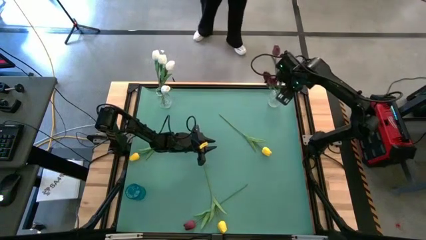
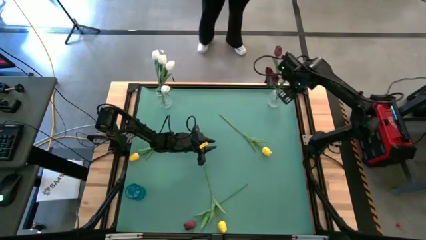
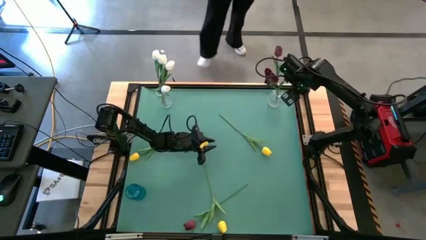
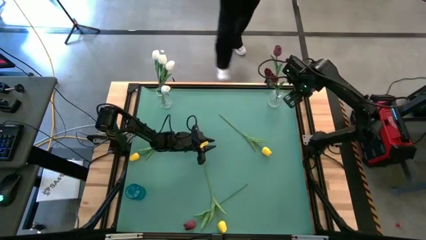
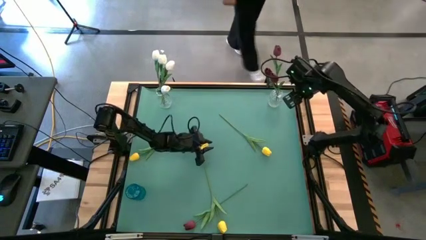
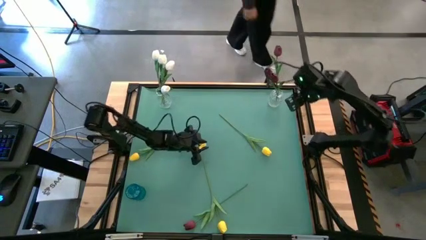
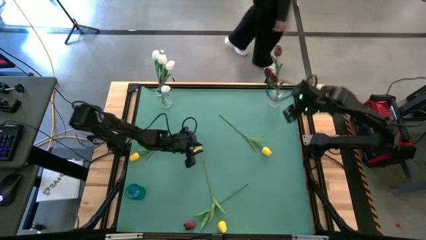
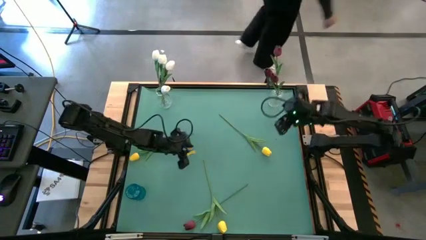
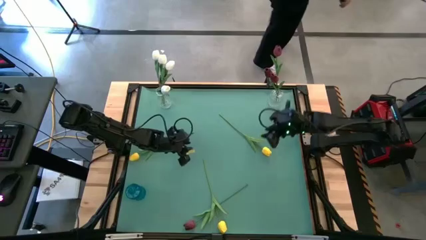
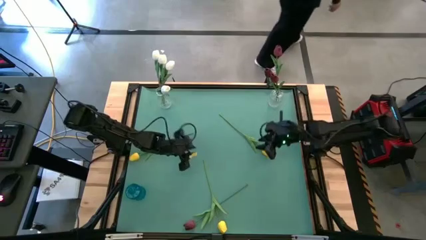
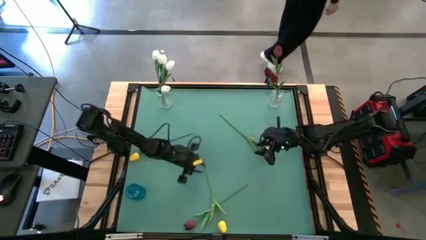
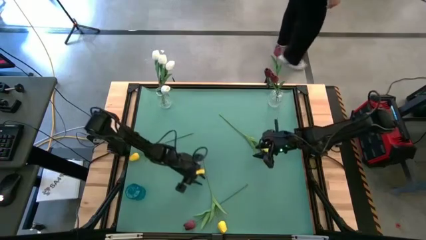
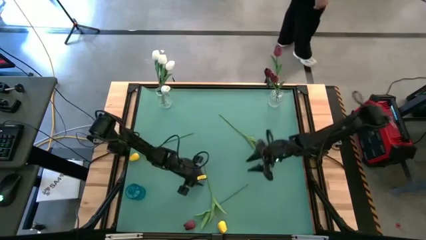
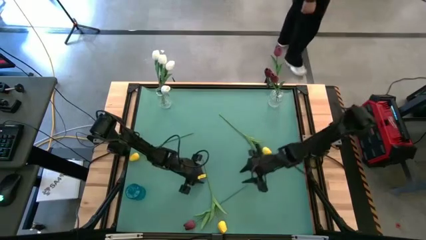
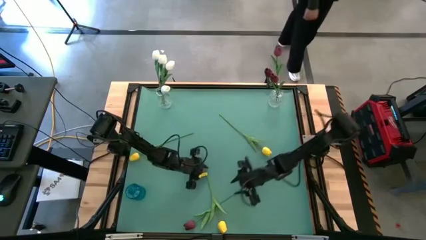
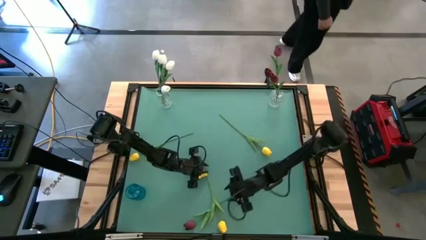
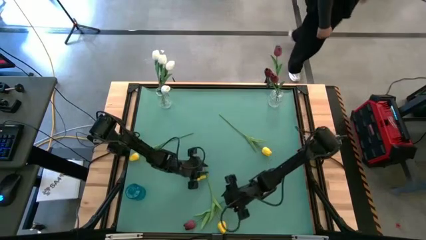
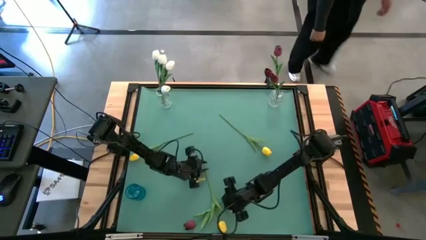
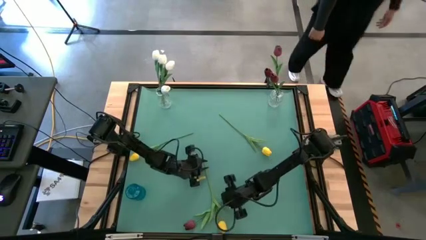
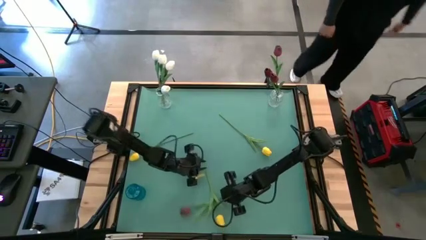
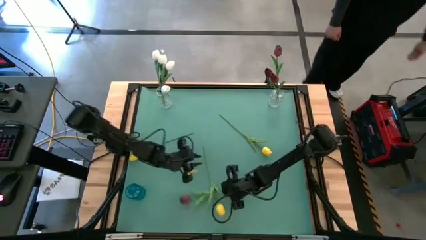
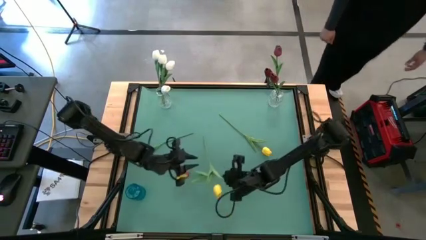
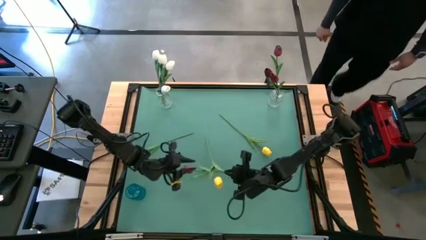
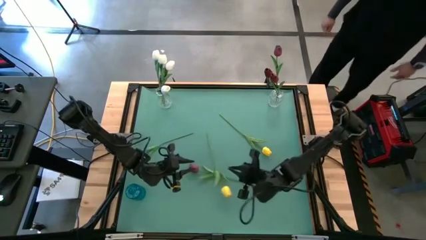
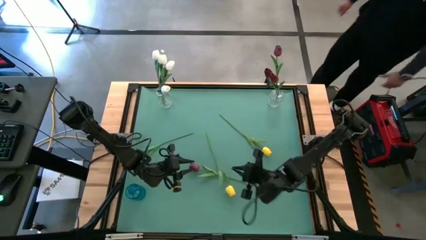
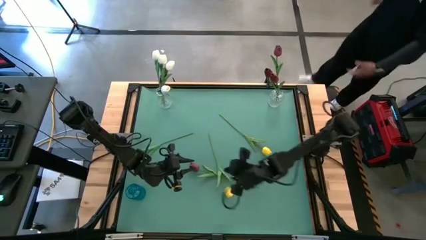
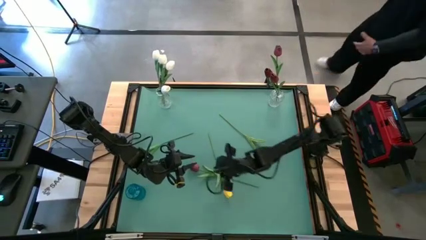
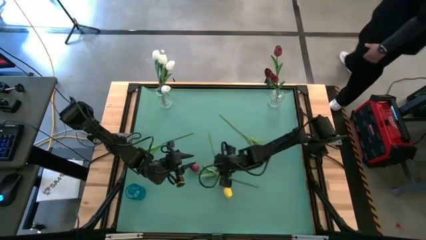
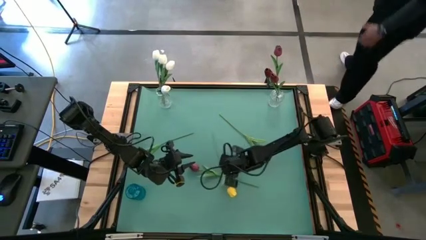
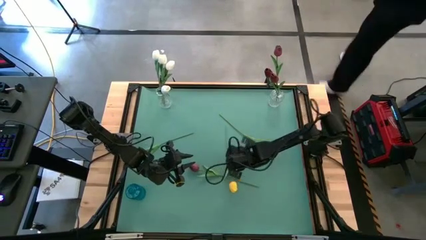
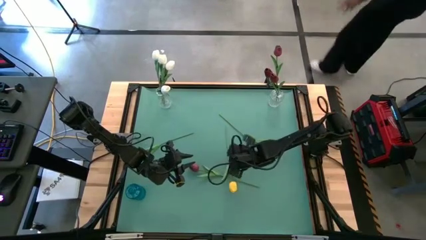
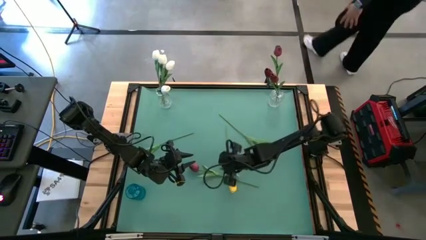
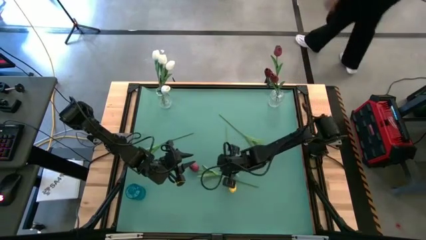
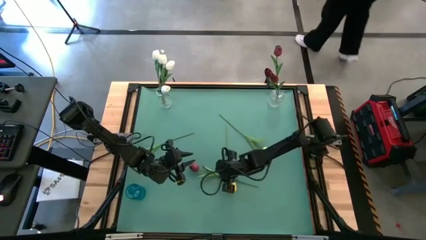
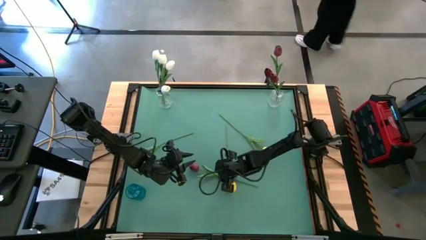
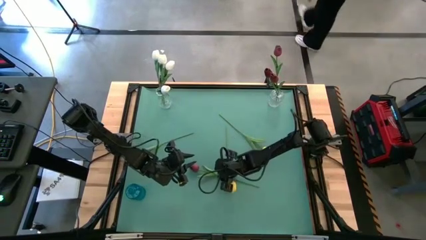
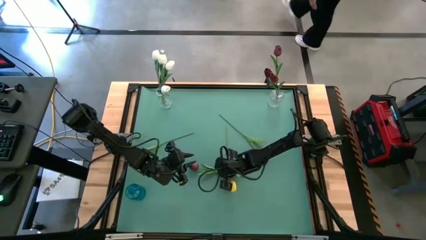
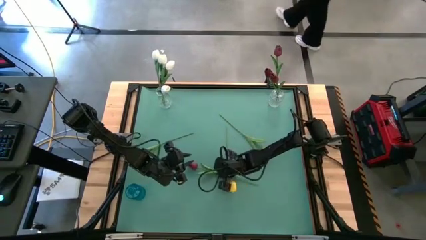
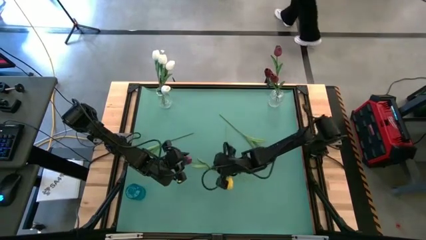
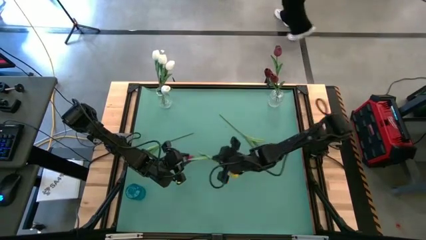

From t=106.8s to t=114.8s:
Task: Sort flowers into vase by color
Put the red flower into the right transparent vase

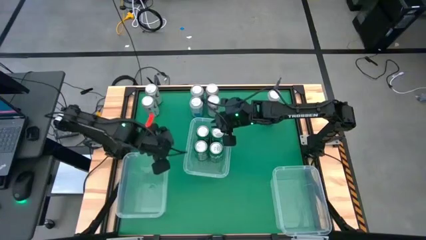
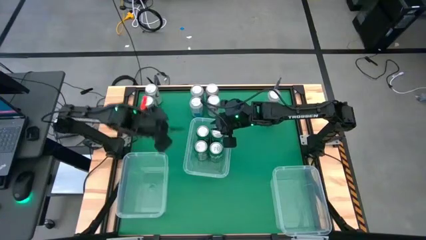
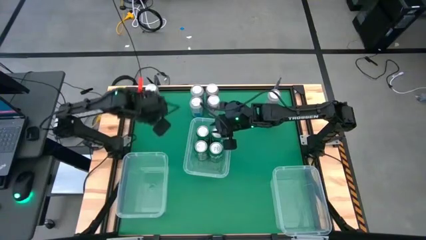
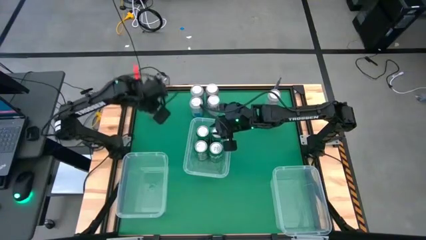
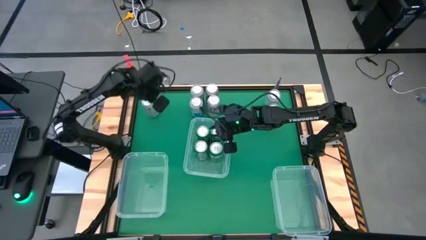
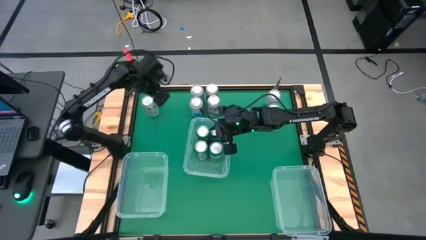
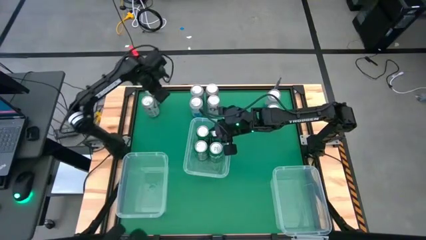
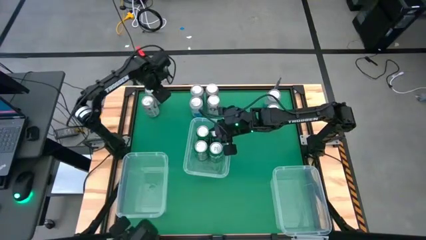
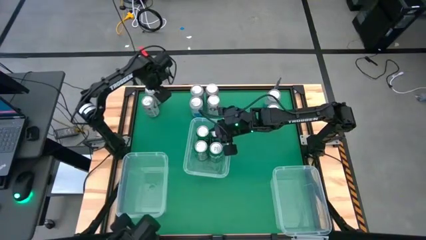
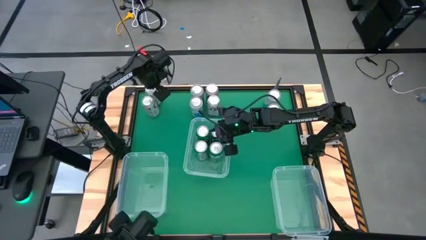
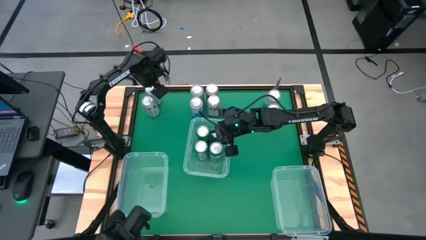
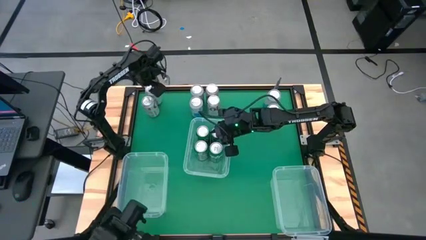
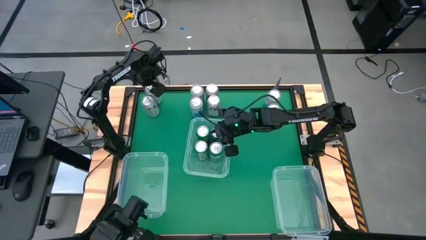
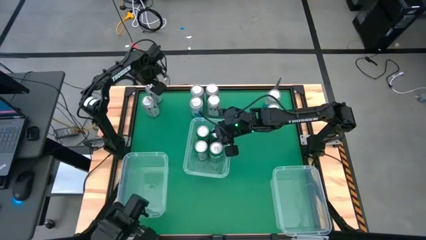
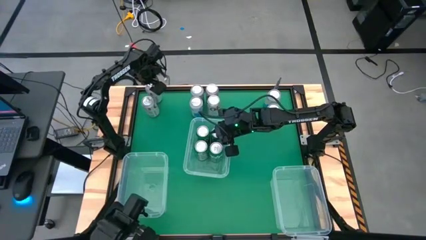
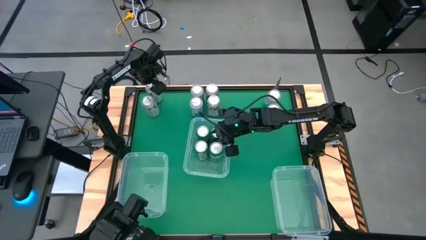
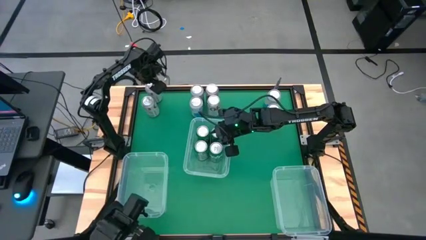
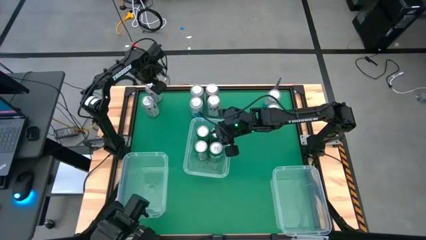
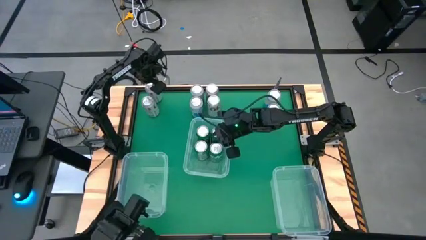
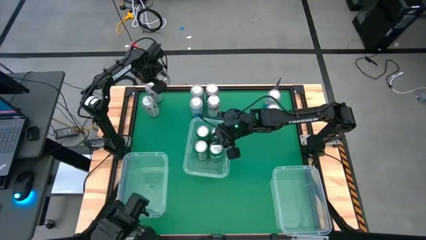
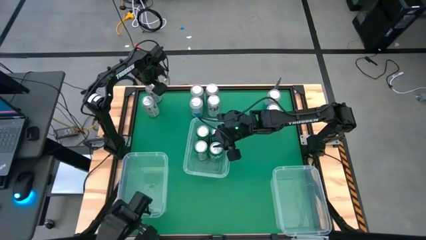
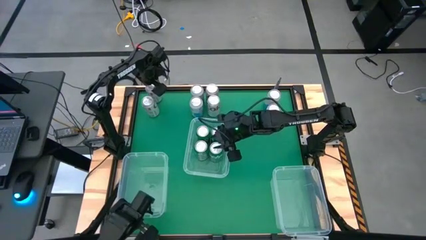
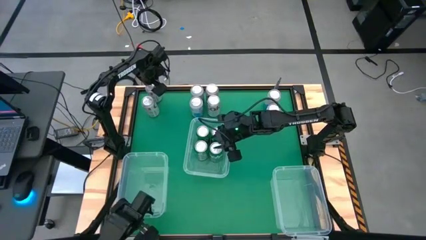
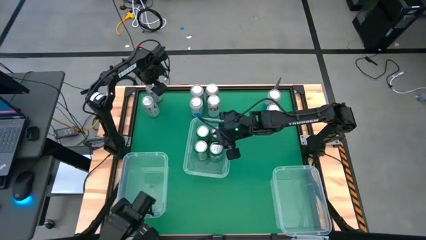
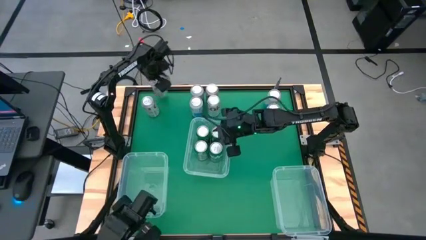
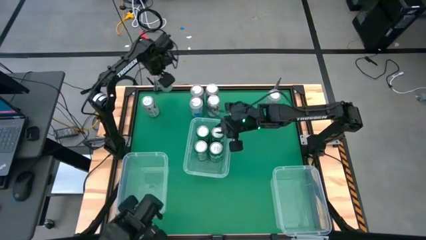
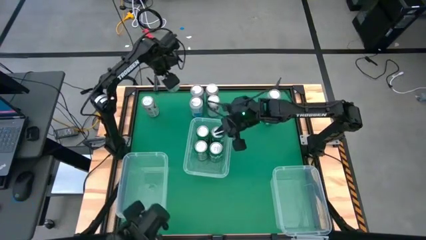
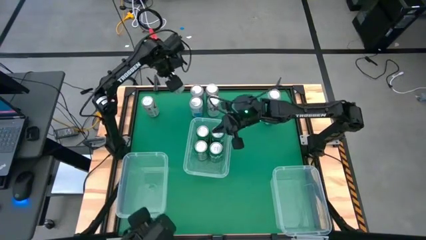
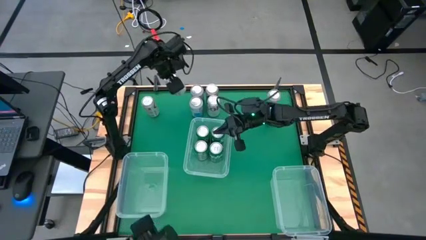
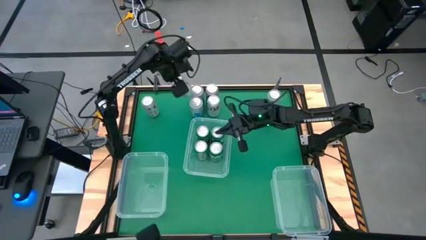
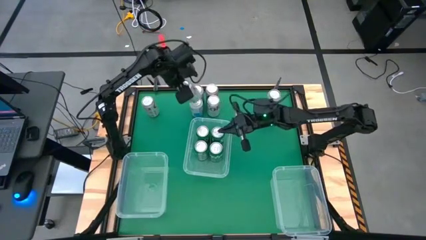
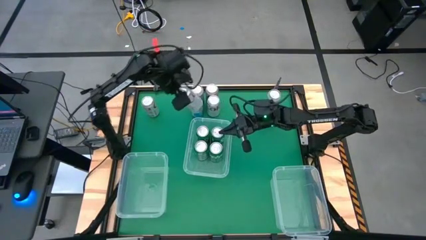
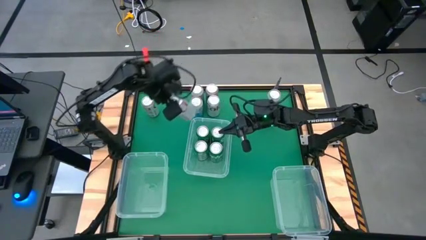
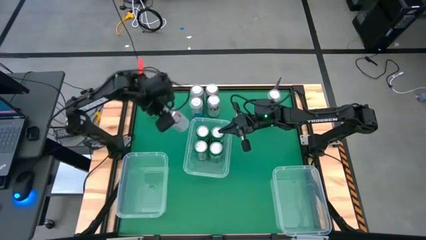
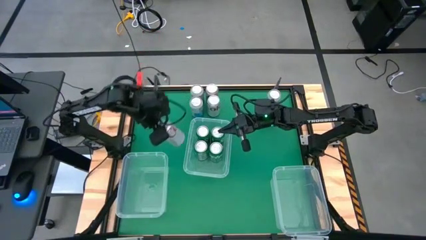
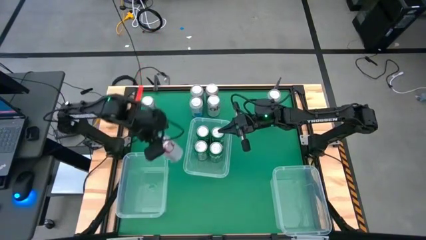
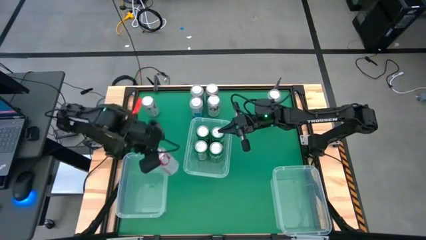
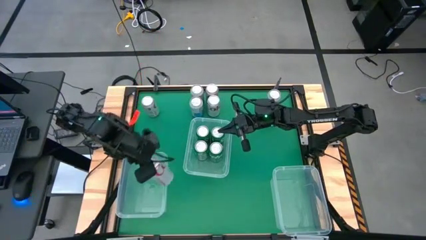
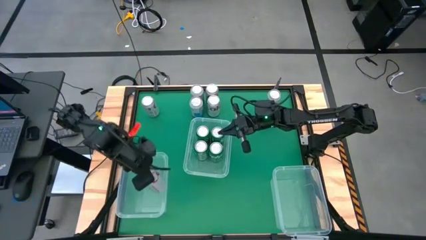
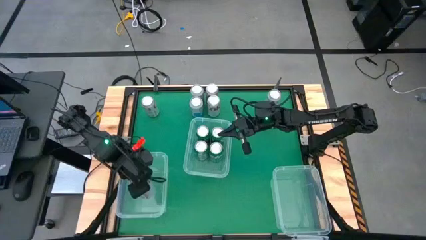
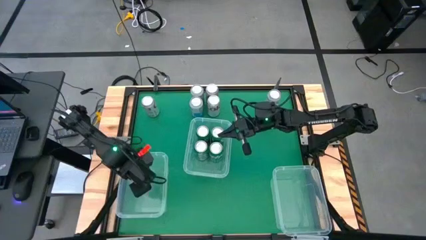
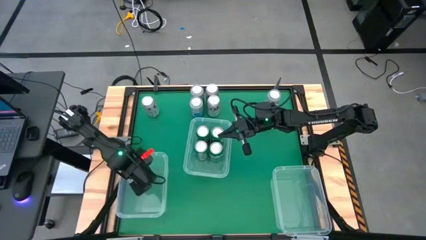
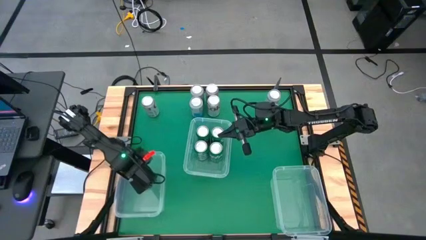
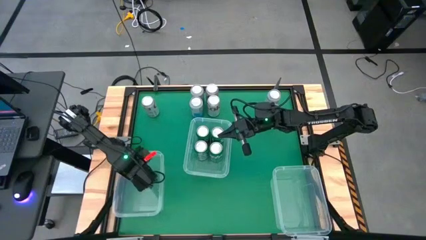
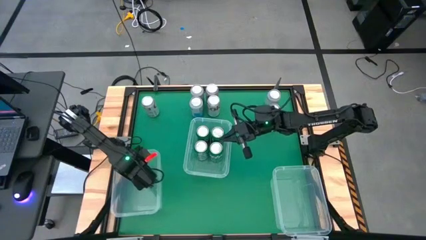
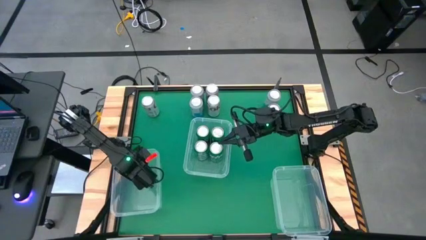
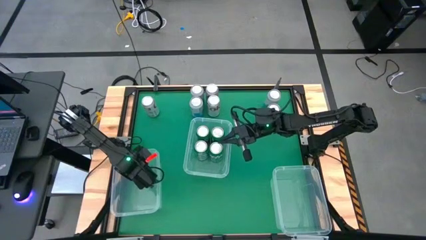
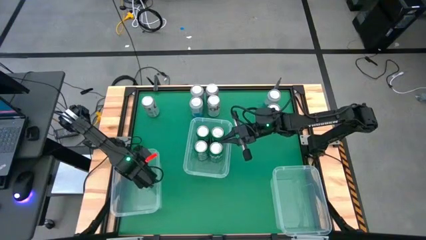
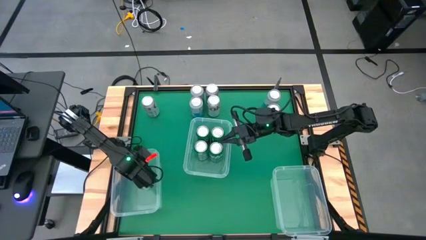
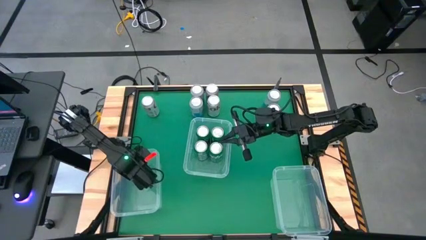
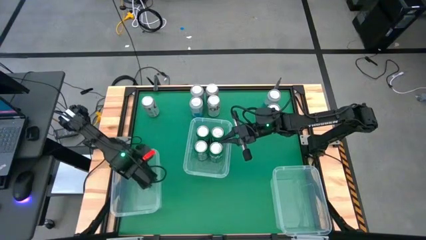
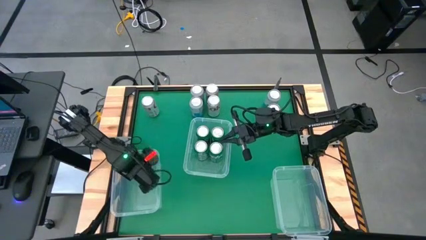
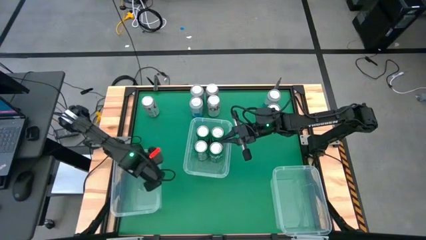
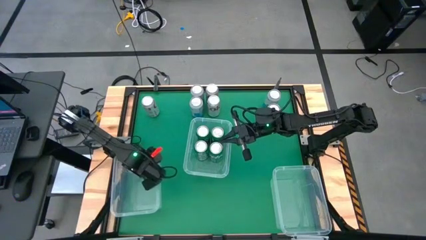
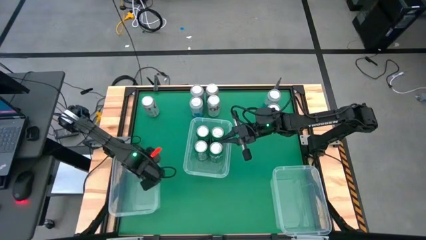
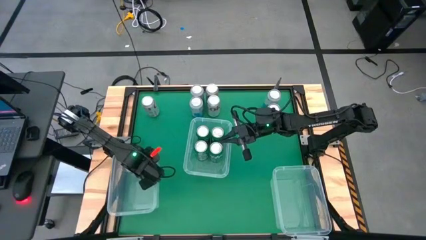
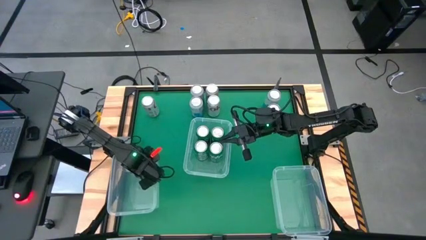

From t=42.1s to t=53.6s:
Task: Sort soda cans
Put the silver soda can into the bottom left bin
